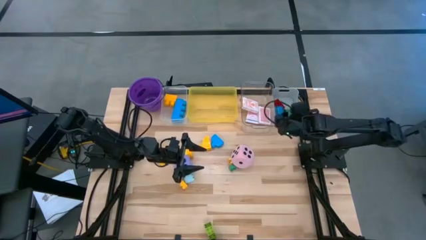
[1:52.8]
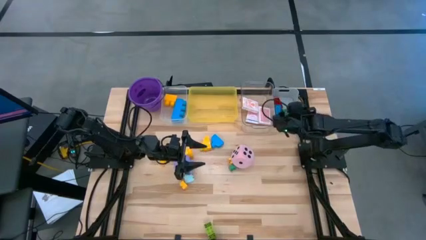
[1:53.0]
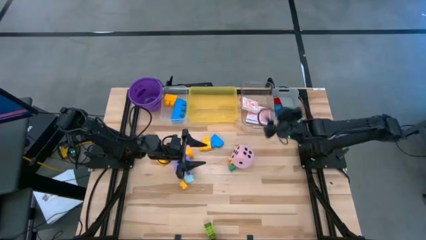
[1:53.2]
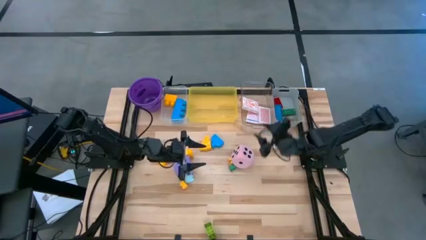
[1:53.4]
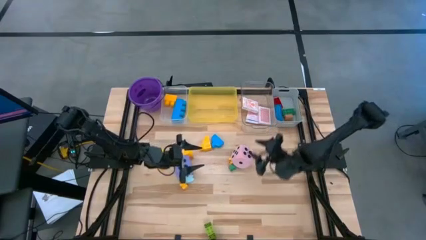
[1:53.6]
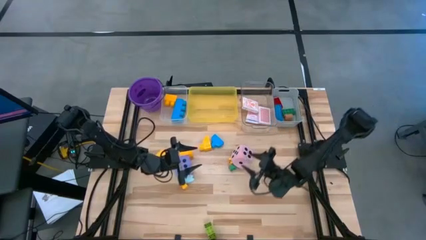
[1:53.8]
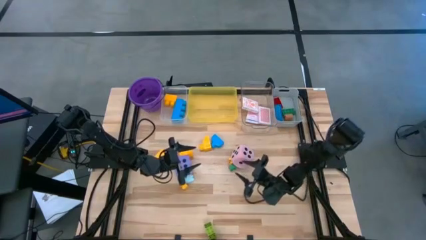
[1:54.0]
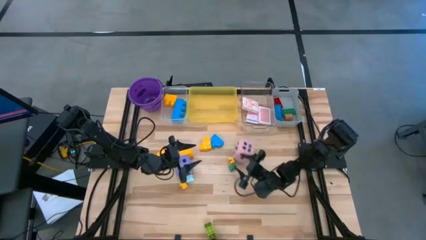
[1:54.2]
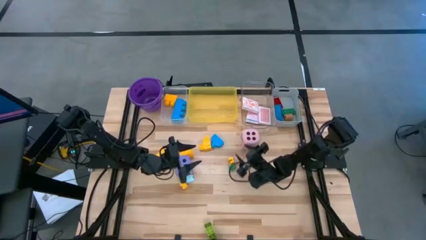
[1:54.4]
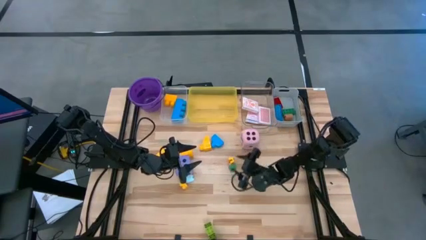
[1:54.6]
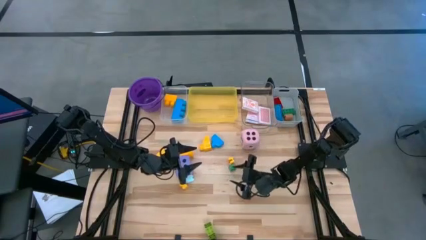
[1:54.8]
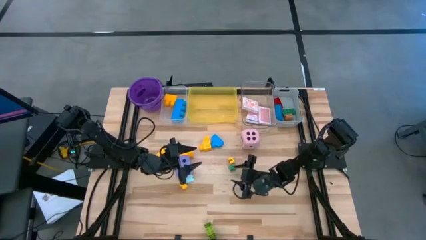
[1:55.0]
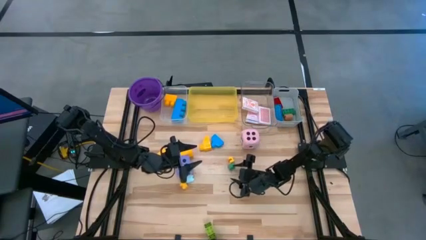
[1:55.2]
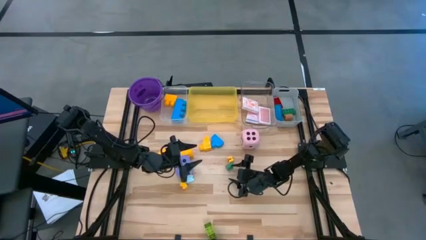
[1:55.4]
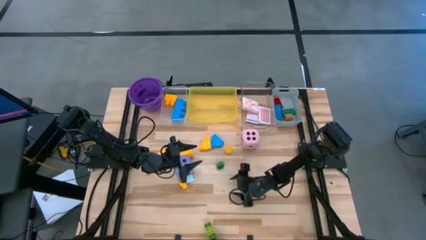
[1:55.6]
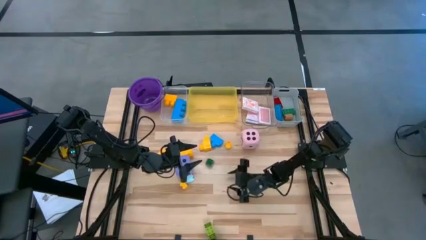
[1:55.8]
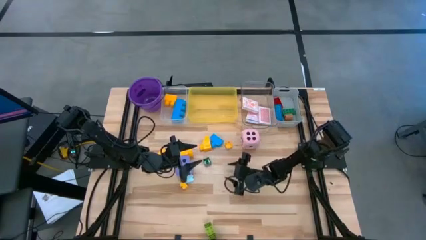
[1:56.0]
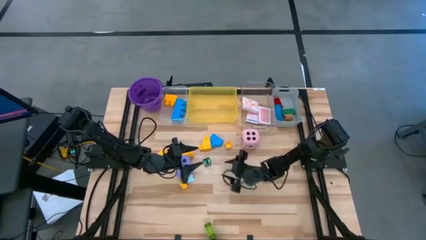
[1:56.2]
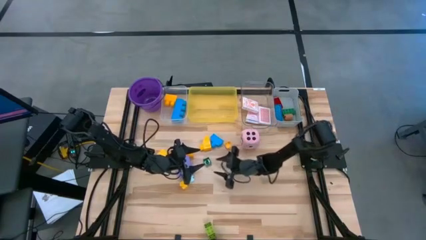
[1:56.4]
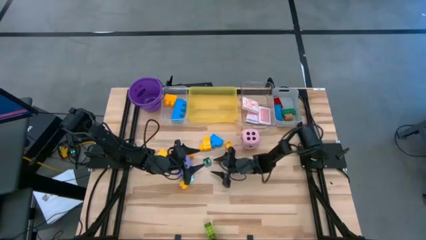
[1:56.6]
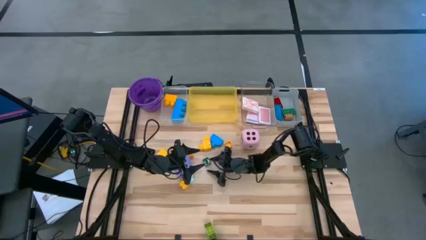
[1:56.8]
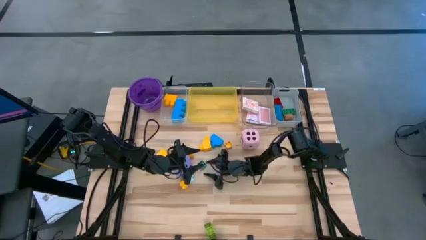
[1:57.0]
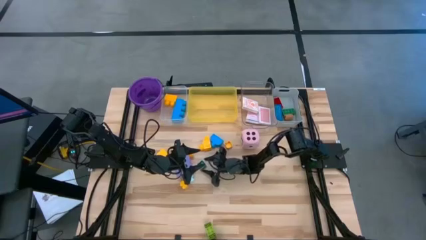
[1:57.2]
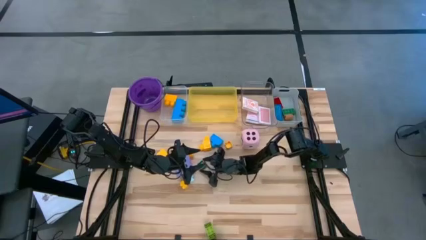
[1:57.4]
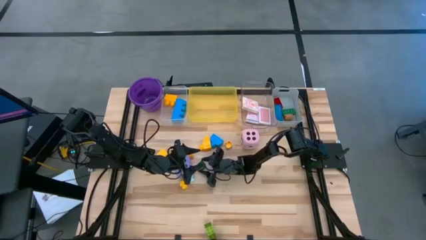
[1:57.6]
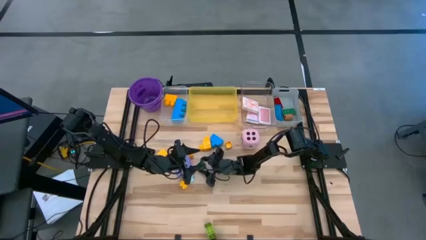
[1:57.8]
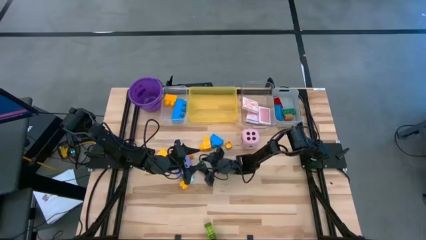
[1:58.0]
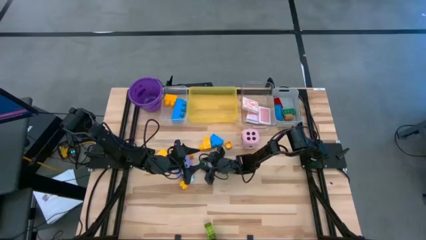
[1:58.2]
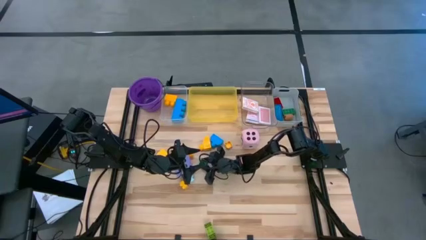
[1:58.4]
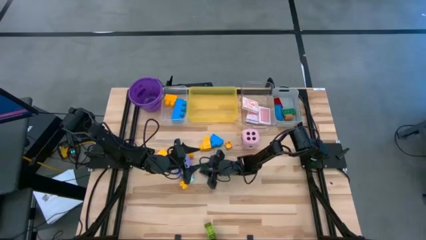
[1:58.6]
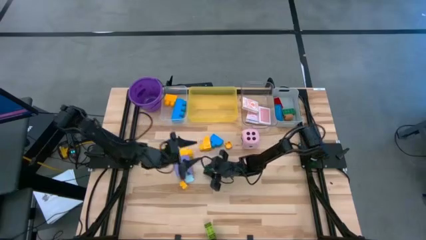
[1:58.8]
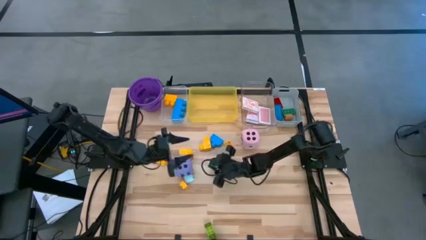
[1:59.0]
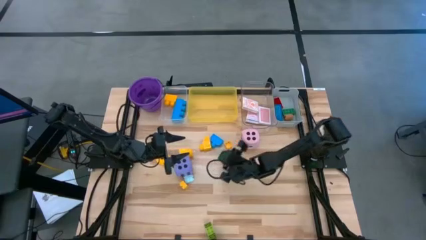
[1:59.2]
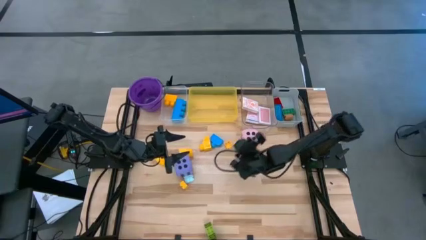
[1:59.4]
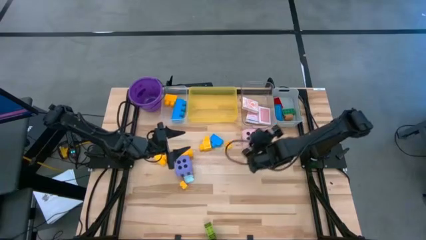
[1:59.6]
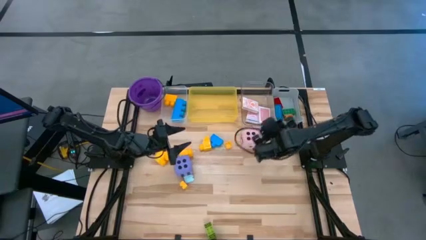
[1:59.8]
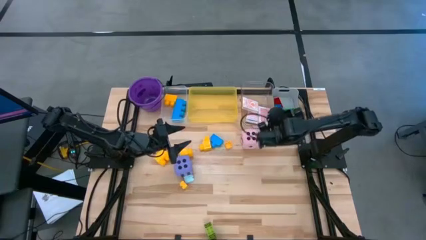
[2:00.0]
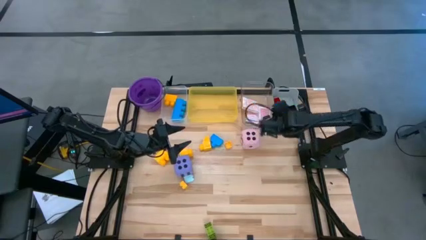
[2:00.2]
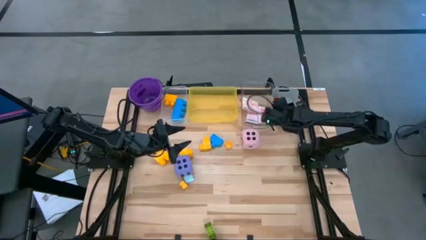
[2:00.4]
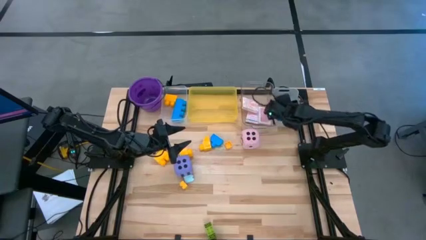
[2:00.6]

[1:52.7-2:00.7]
Task: Pick & Place Toys
Put the small green game piece into the gray bin

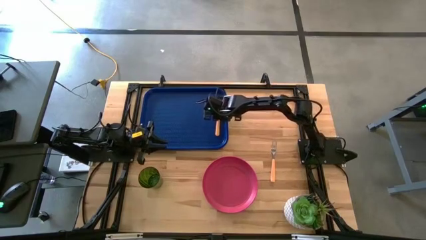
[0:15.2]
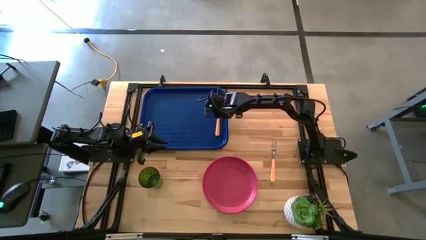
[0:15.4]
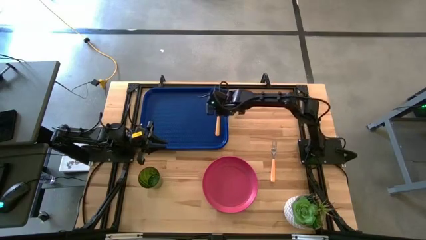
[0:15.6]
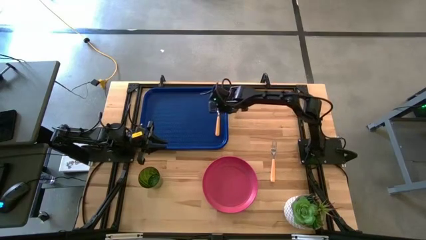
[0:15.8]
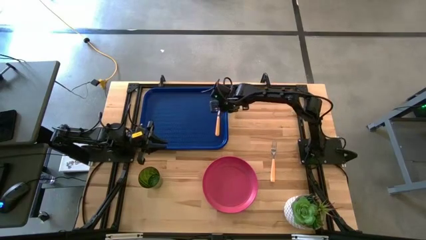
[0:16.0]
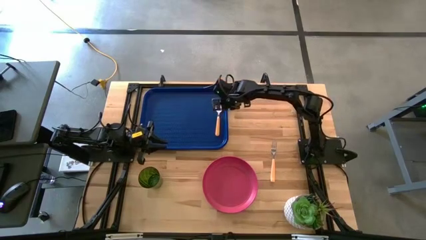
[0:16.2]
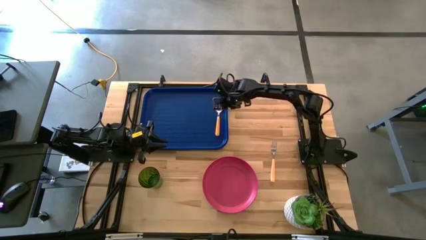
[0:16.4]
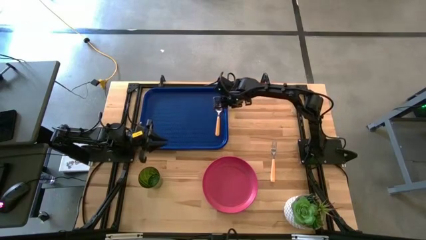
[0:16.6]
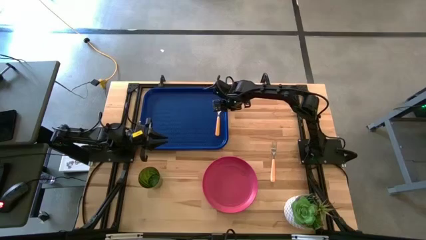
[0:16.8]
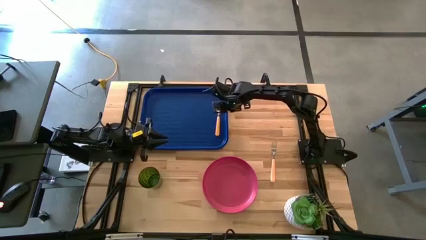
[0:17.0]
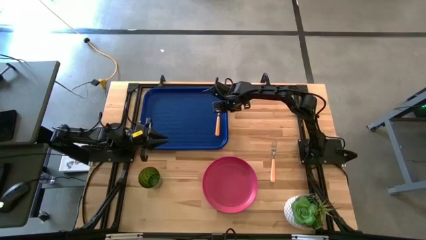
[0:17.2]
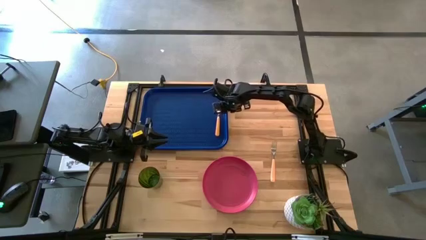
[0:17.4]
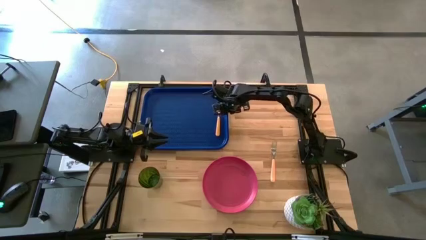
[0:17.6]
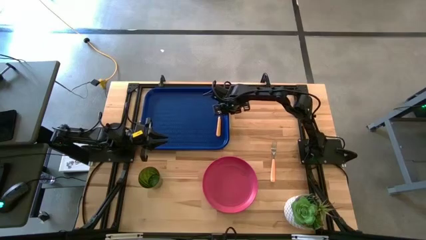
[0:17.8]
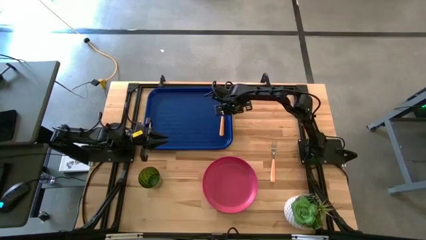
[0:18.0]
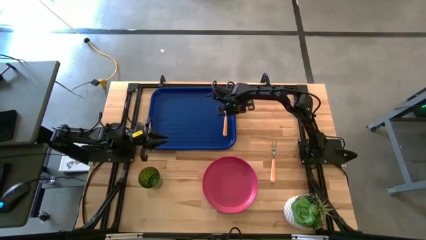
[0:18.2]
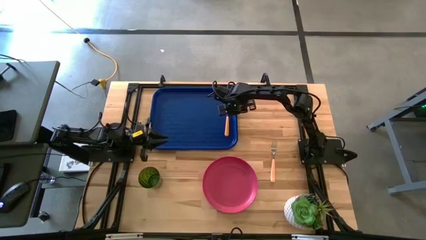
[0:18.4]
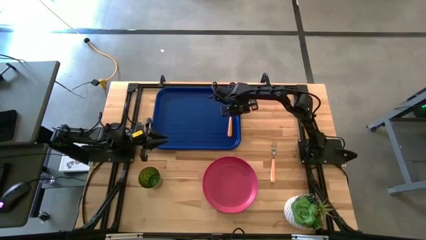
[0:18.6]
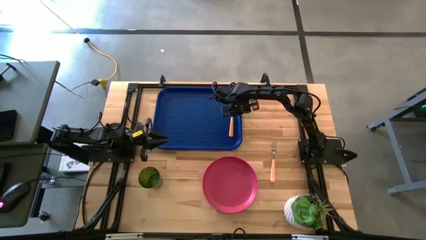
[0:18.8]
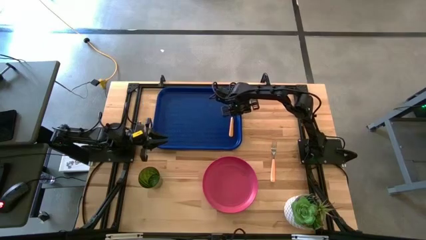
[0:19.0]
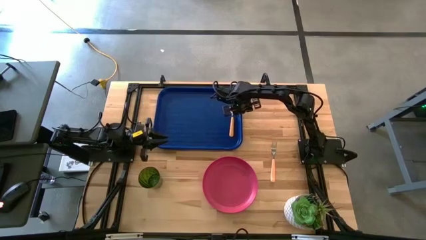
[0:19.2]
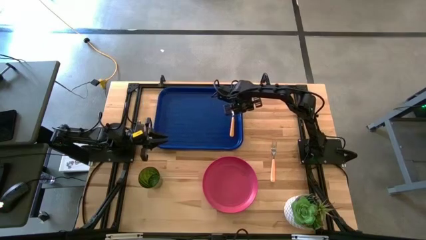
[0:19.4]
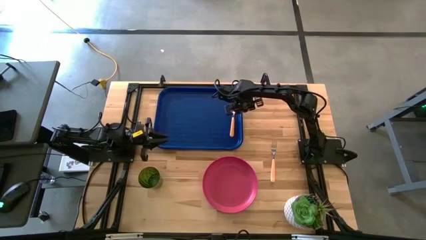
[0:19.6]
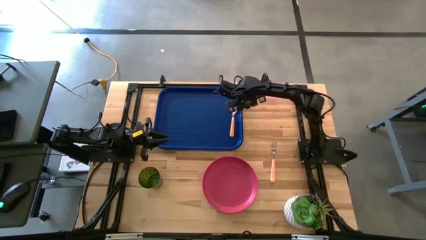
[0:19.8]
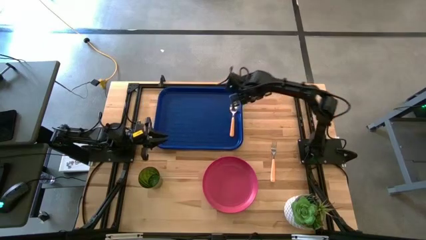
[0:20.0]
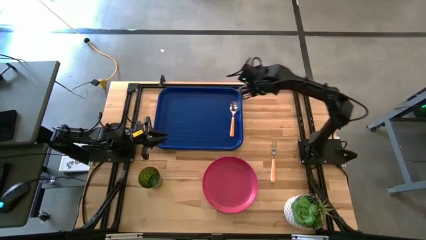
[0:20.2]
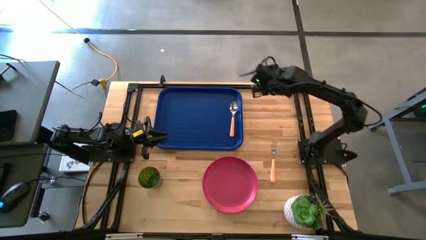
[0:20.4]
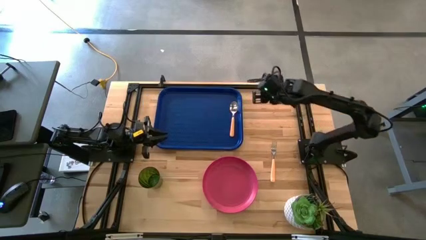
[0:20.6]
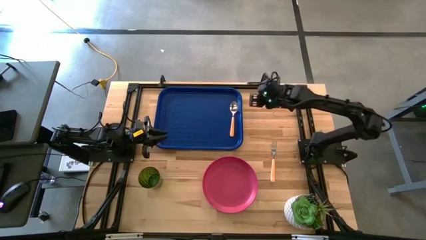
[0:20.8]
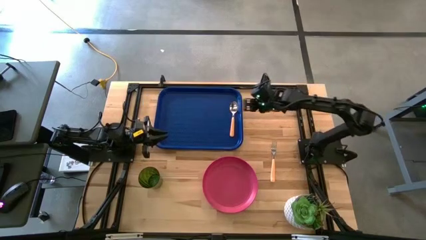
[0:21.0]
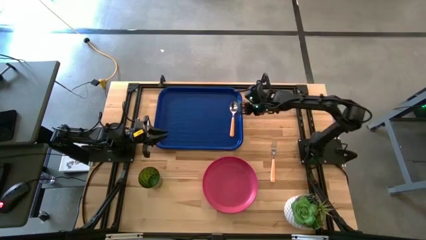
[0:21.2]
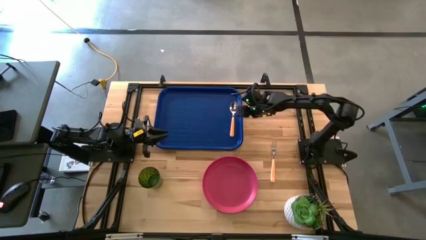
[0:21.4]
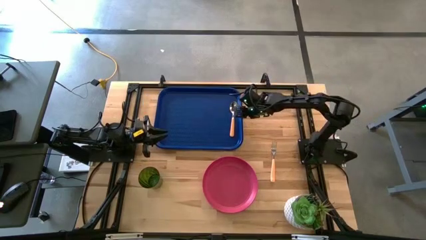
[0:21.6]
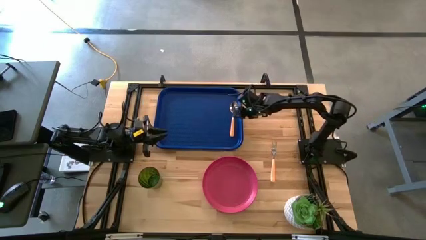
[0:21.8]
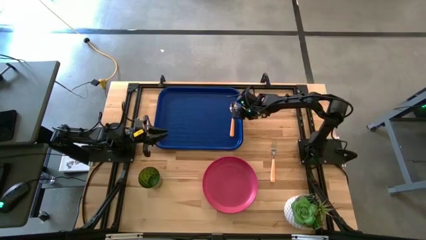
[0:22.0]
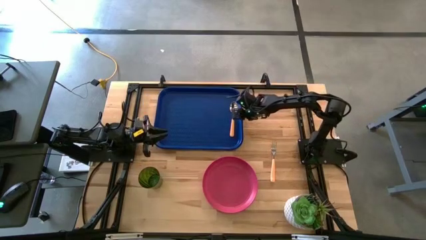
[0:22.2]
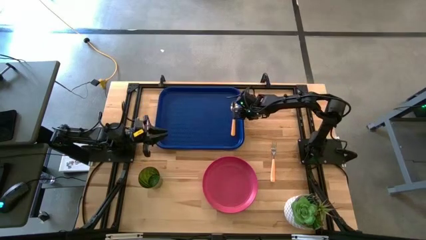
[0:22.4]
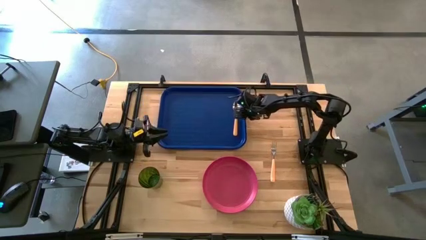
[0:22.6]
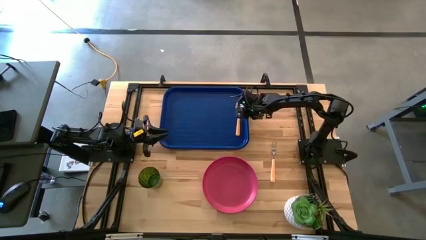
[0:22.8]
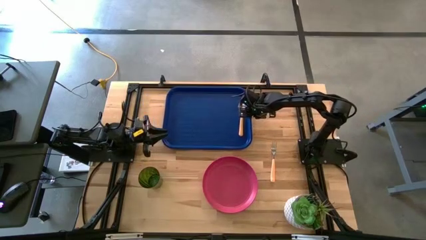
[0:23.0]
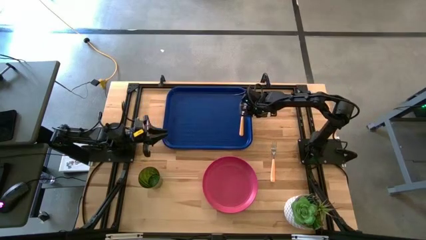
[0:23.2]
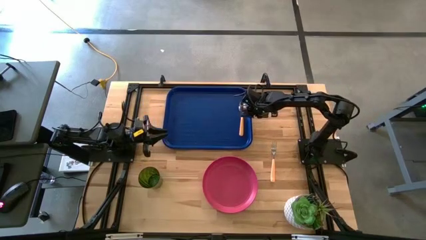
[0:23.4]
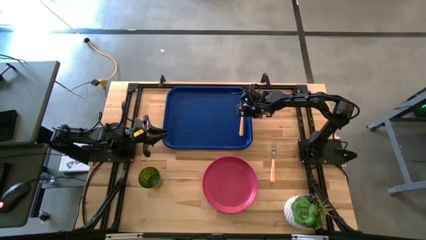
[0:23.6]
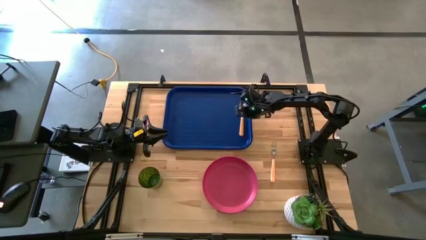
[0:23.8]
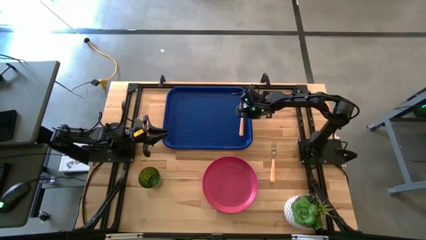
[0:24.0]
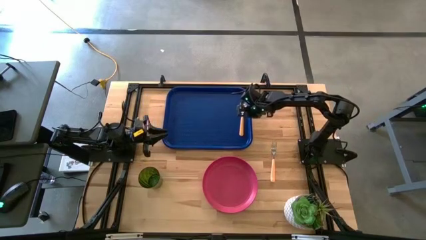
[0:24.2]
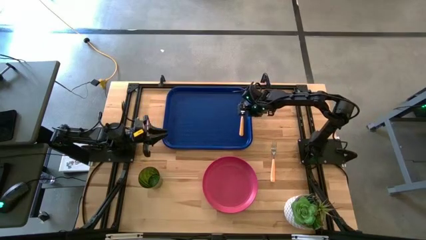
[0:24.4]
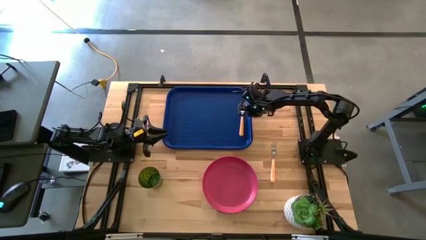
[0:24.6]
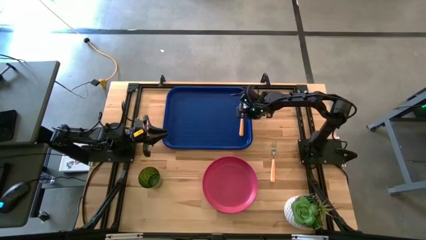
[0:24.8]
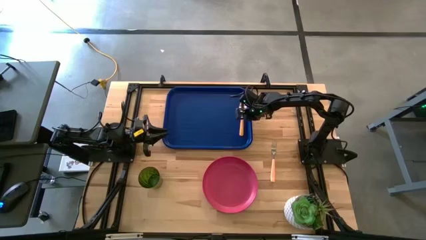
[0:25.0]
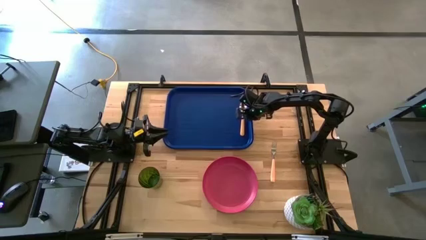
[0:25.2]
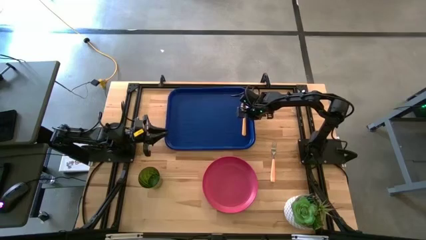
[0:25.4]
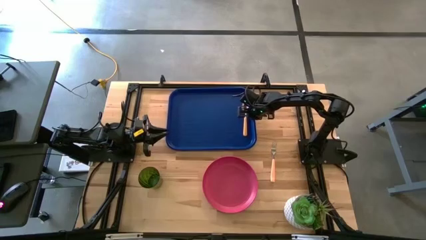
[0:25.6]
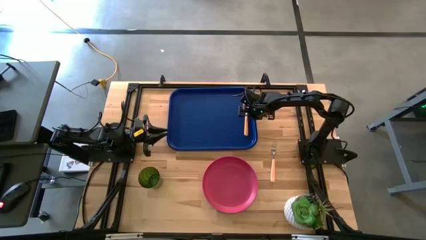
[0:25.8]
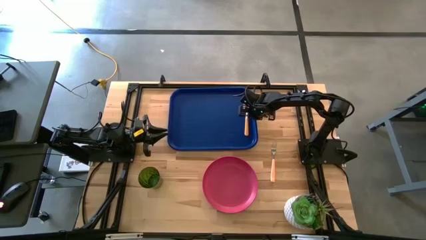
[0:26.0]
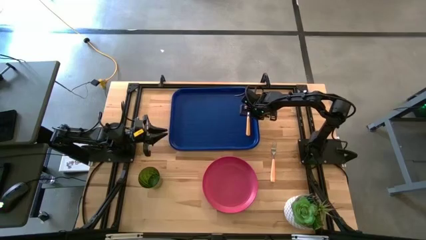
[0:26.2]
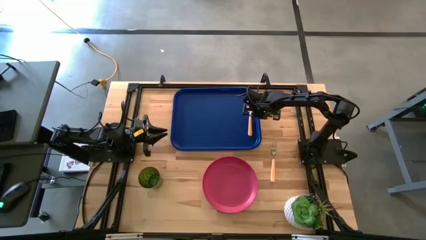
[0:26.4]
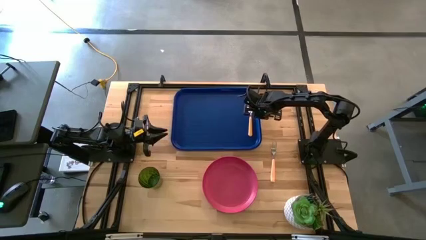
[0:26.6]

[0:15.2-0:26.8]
Task: Pick and place plate/cup/fork/spoon on tray
Adjust the blue tray
